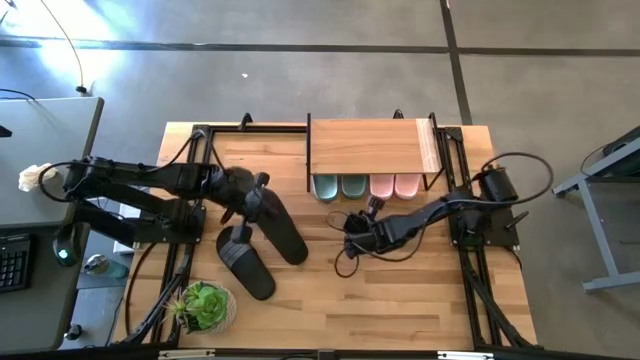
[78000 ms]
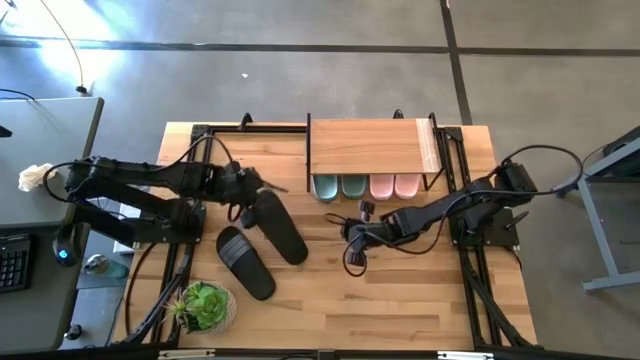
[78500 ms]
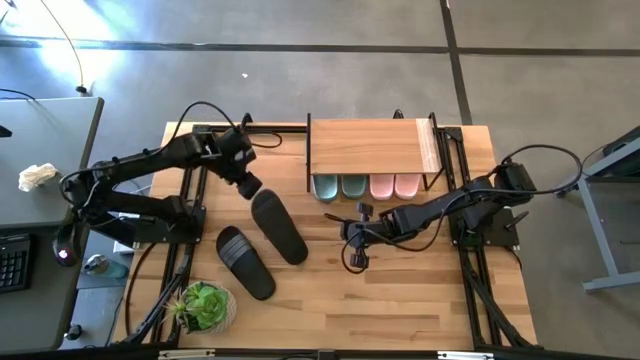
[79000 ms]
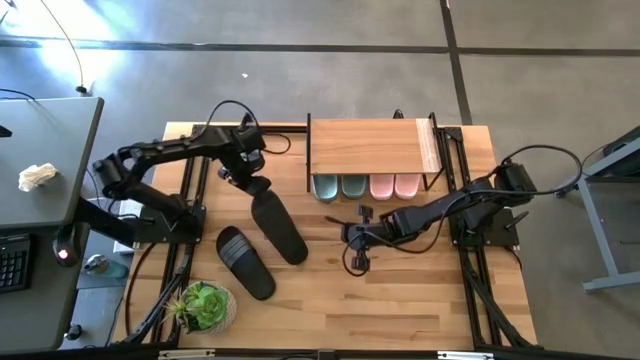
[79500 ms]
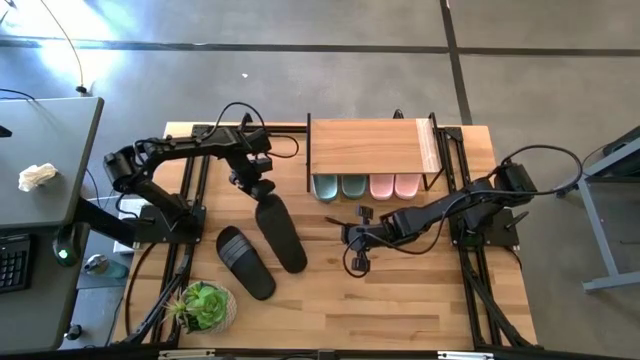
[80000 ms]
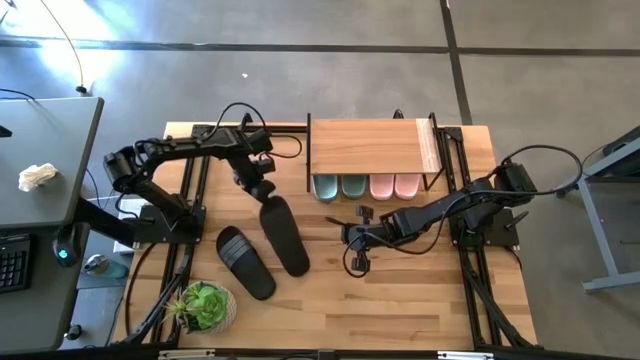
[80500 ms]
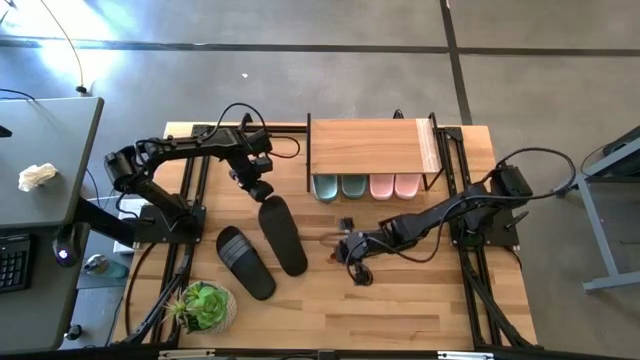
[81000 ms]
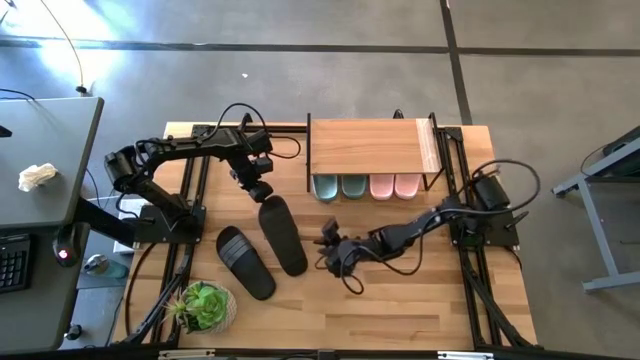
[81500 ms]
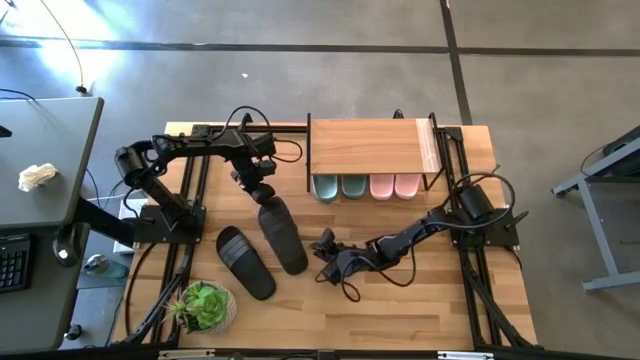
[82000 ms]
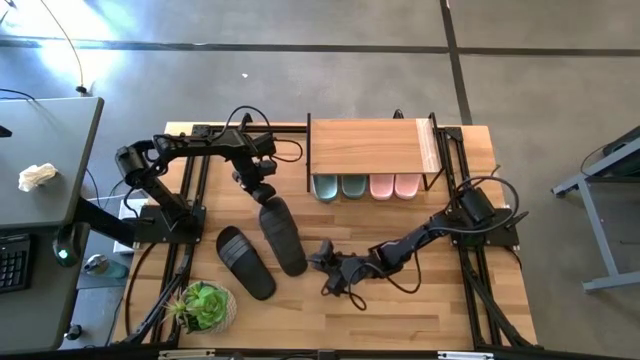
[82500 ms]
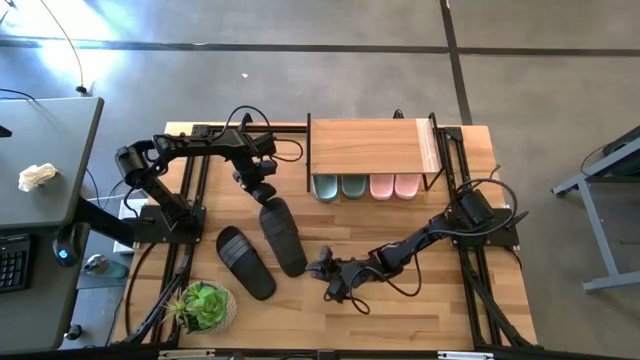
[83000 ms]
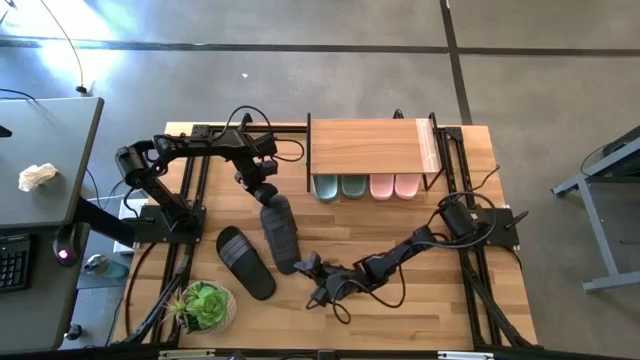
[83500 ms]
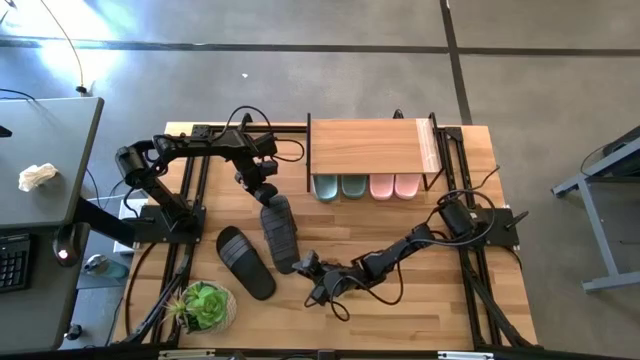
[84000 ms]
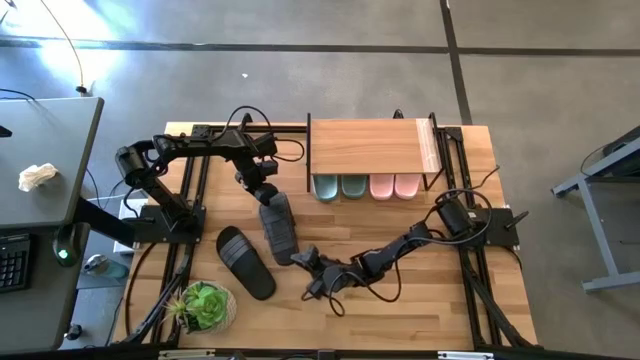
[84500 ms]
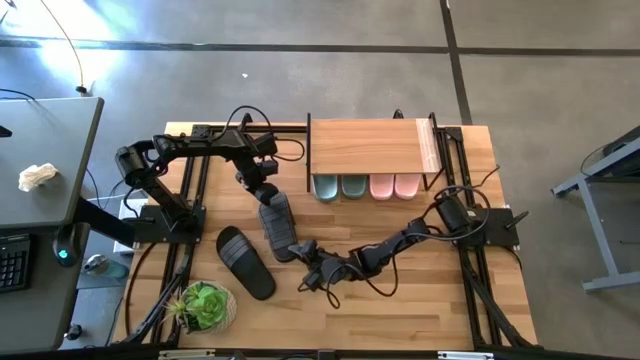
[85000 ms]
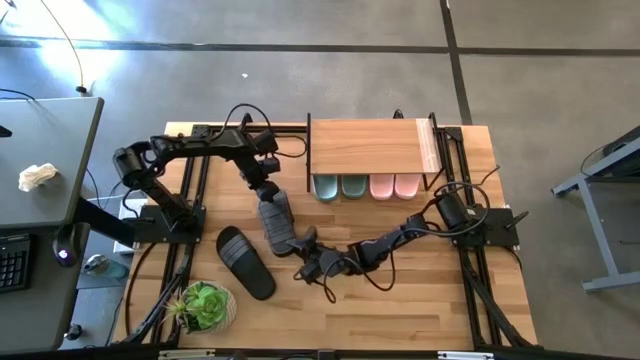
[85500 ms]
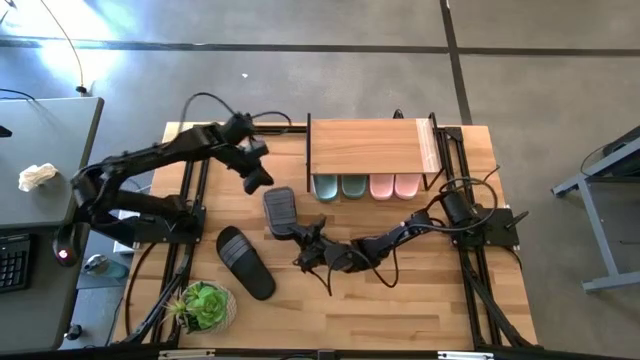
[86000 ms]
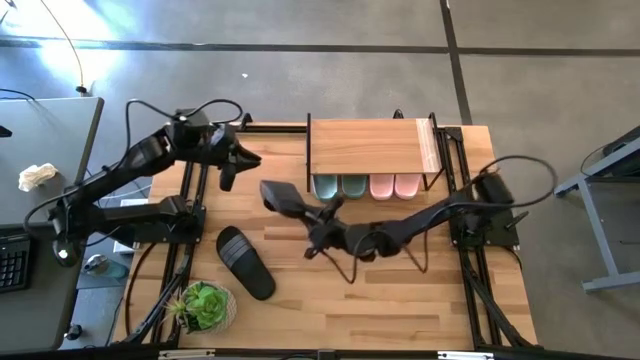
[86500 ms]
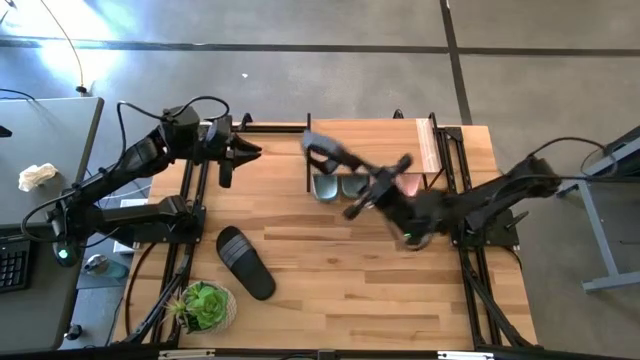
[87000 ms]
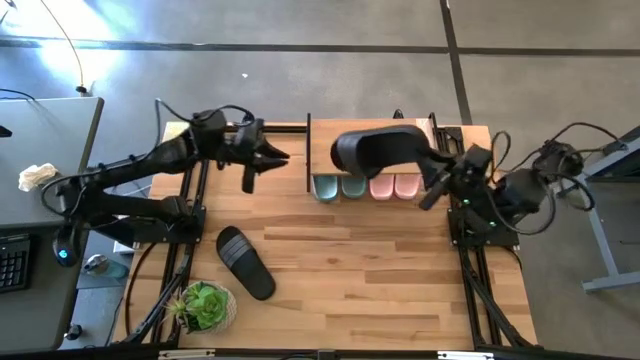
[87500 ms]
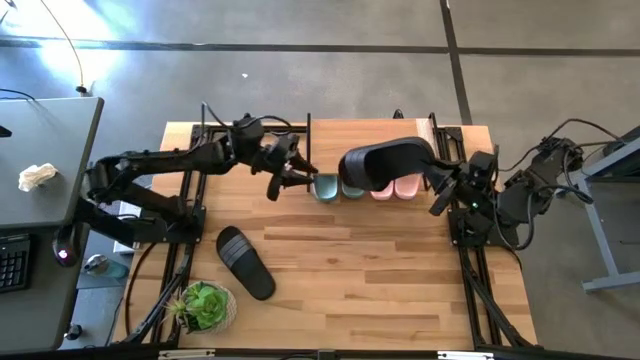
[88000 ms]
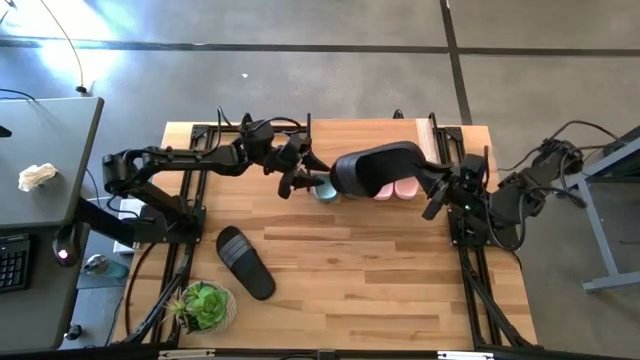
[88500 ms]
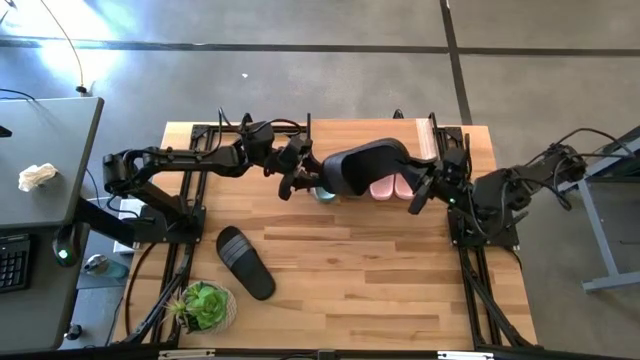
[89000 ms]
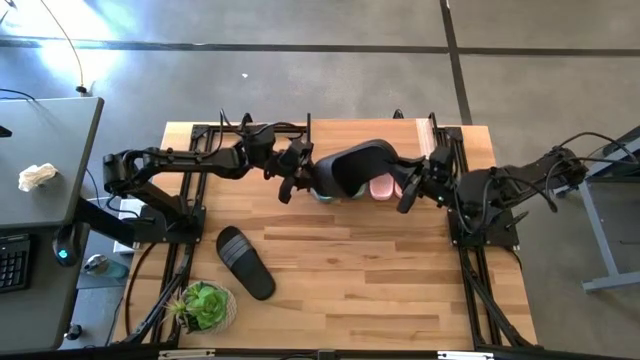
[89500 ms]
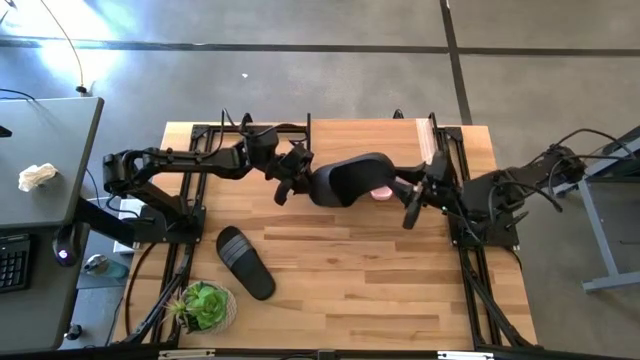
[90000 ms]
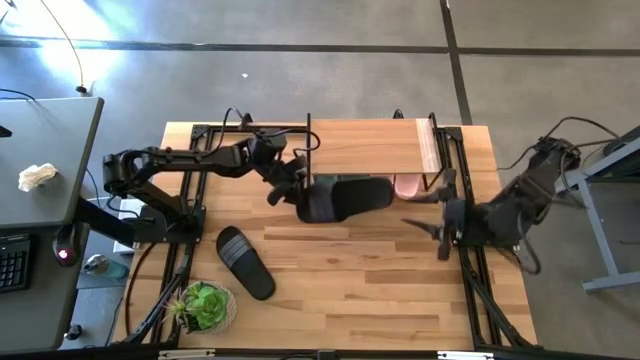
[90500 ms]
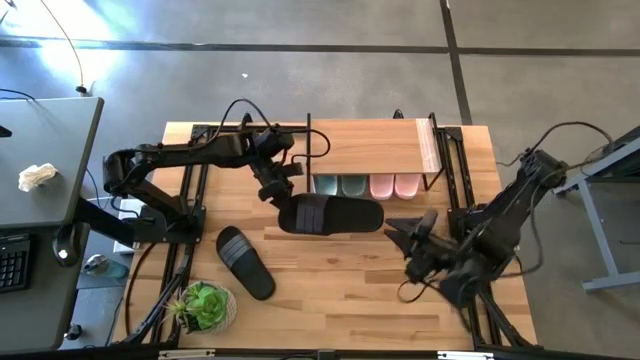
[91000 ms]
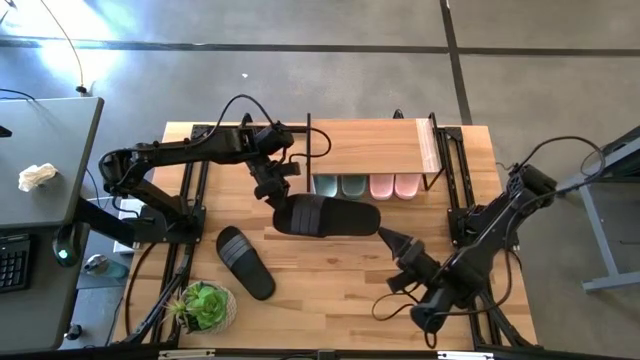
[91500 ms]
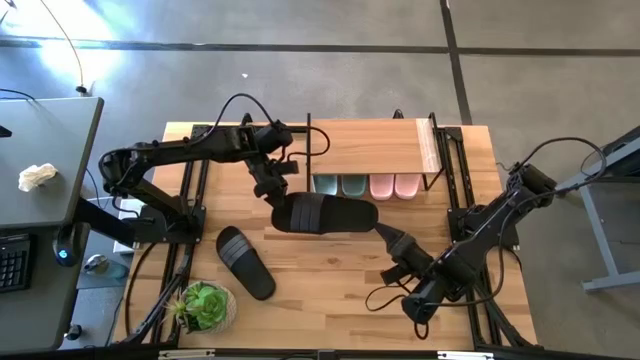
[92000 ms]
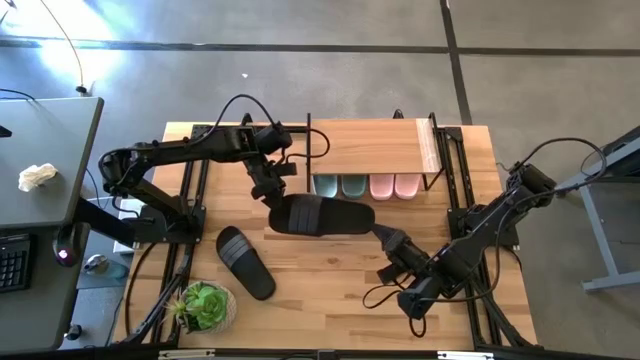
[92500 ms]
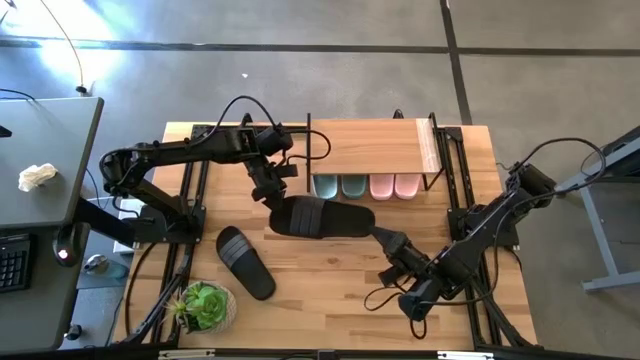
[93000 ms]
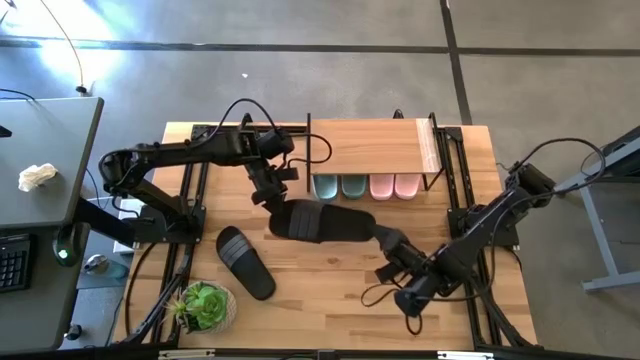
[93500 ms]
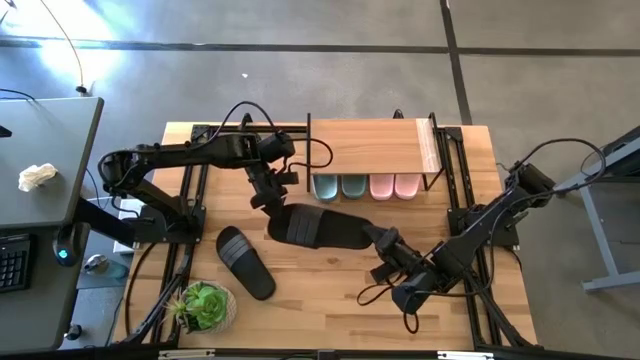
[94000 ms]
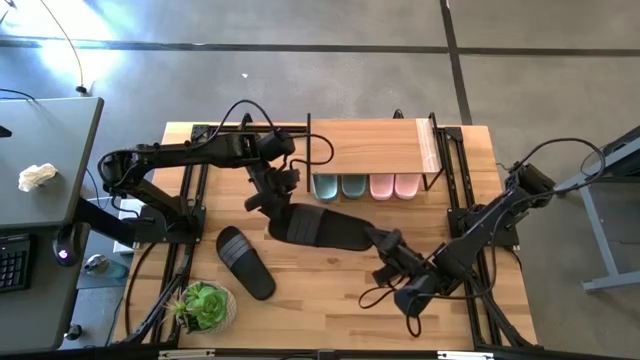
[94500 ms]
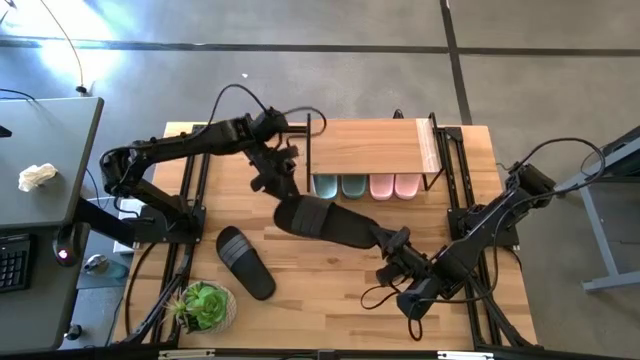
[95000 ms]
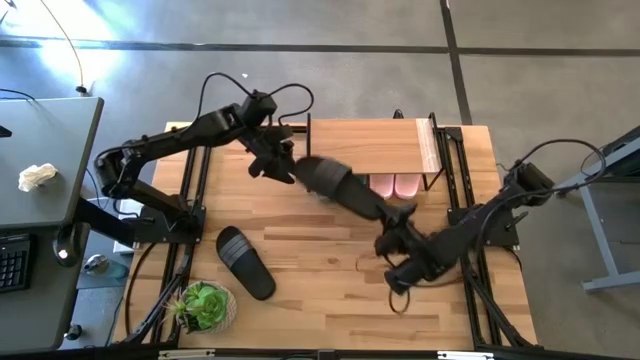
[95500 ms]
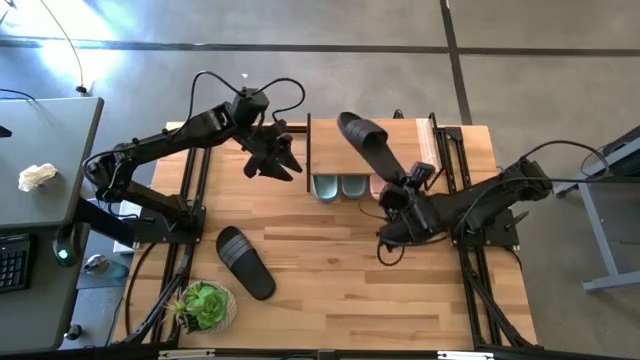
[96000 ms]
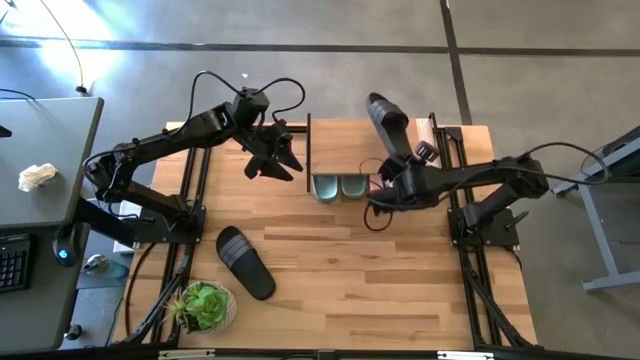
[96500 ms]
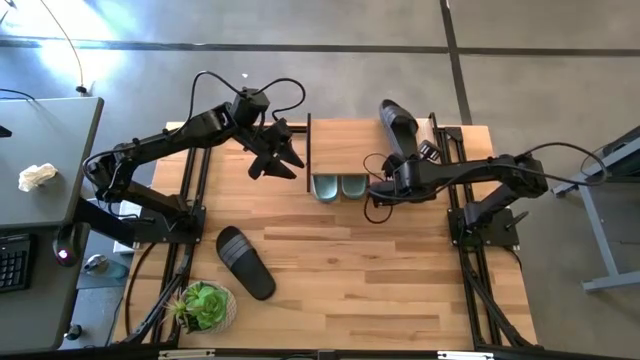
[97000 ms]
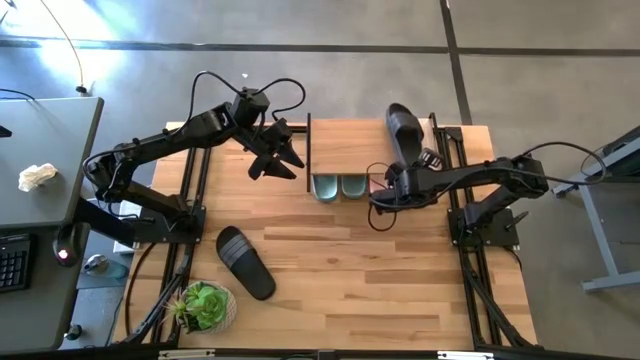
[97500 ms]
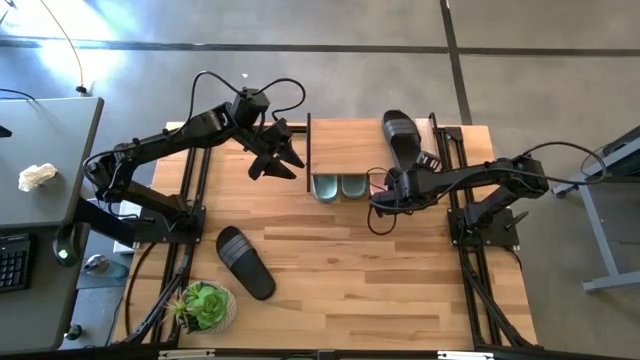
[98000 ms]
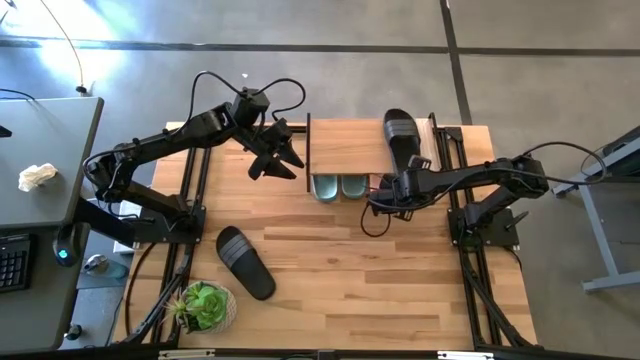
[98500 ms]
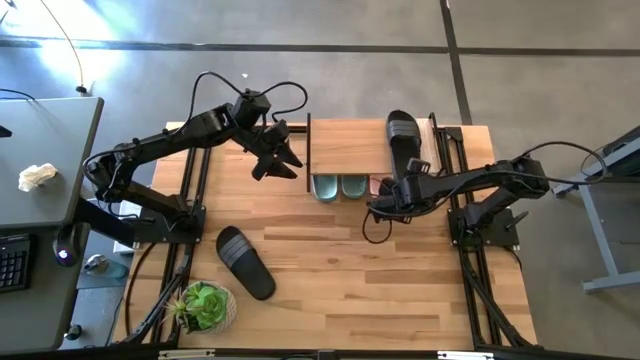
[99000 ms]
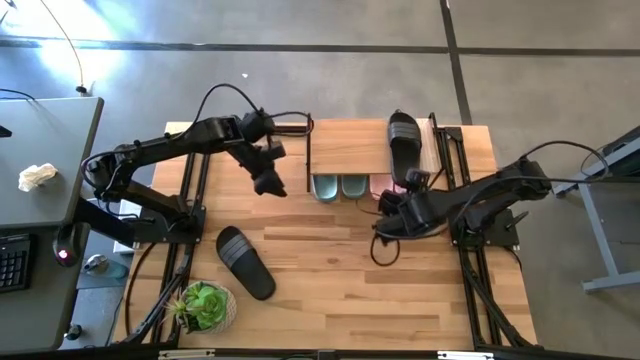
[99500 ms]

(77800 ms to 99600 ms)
Task: Pick and place slides into the shelf
Put the right black slide on the shelf
